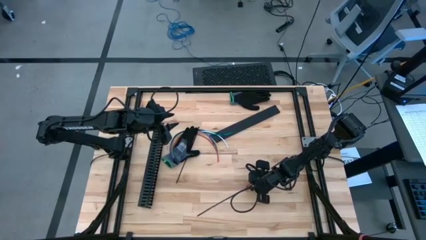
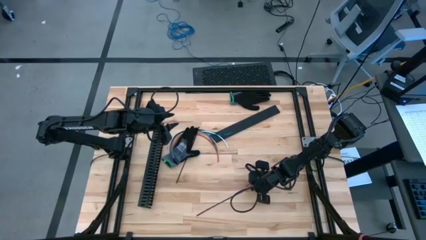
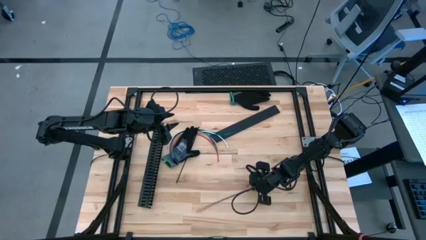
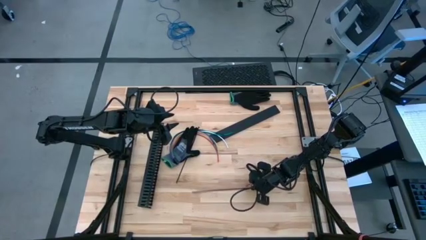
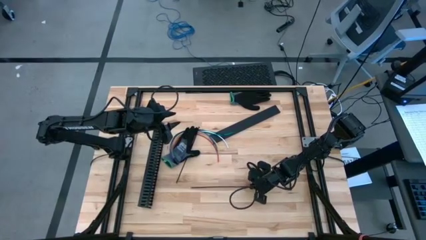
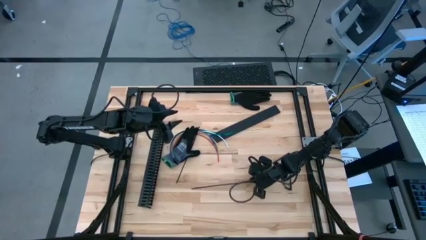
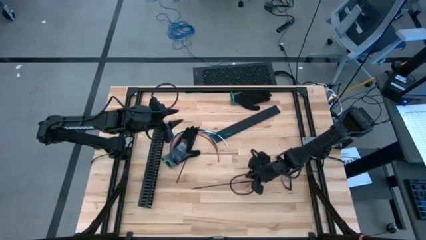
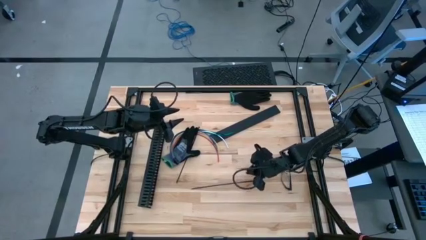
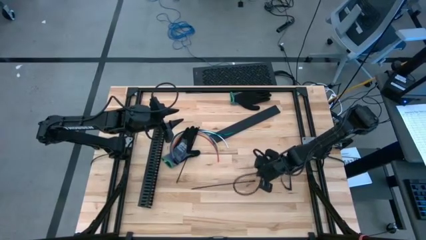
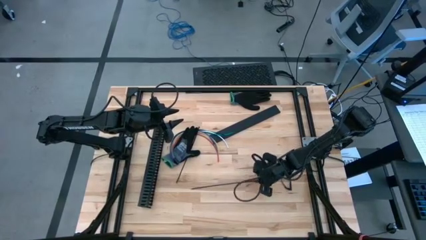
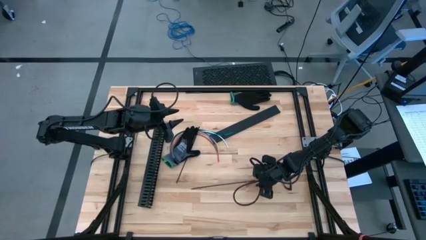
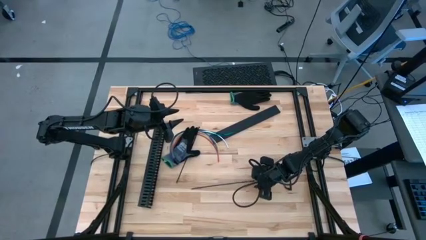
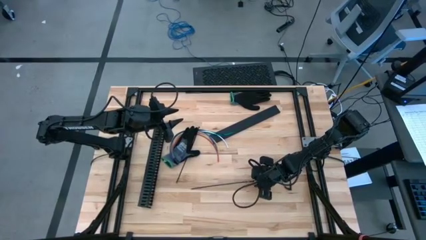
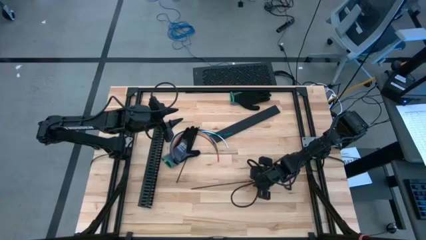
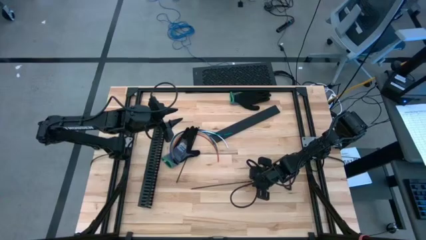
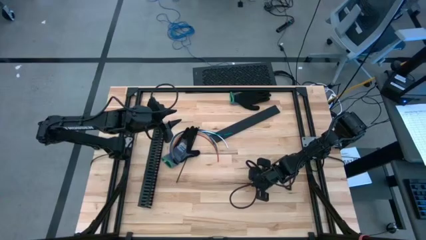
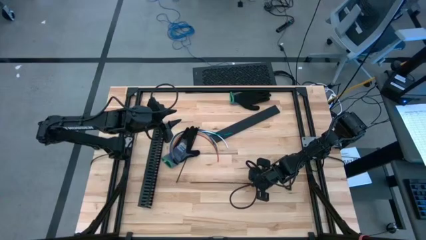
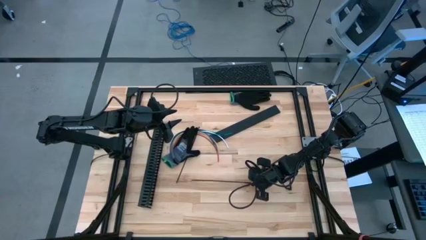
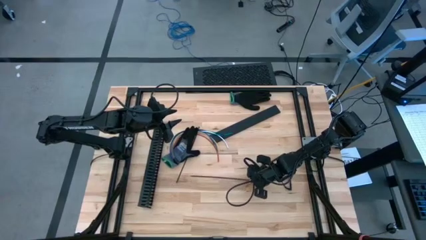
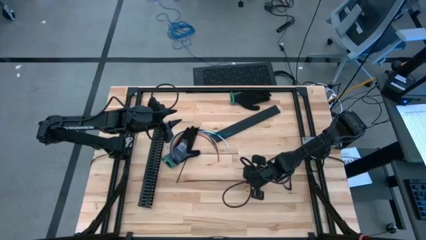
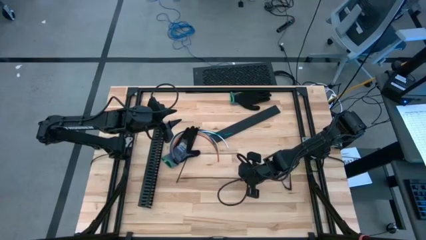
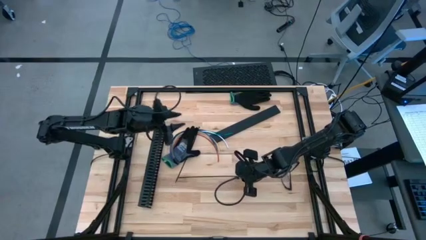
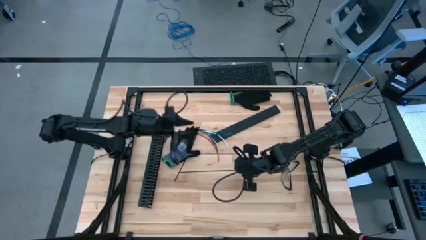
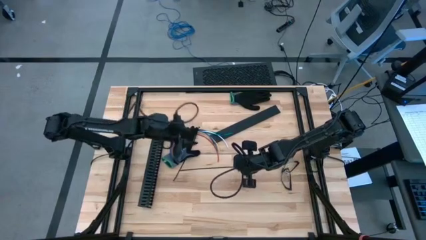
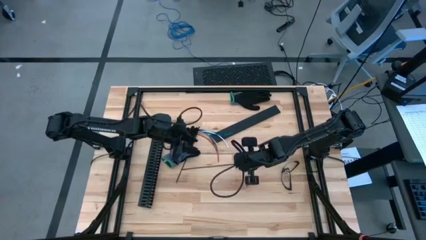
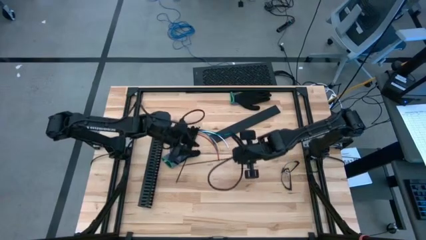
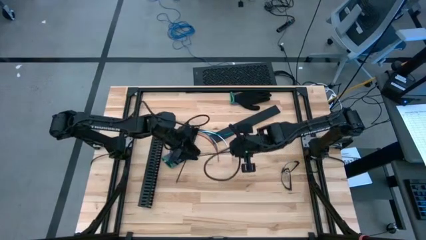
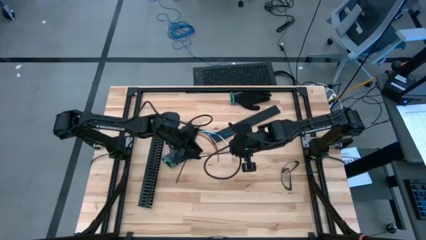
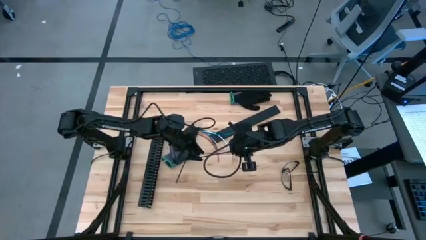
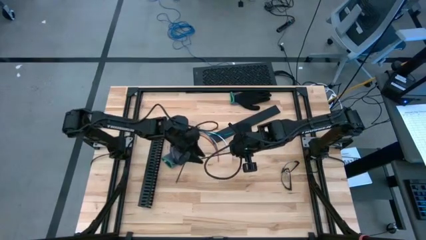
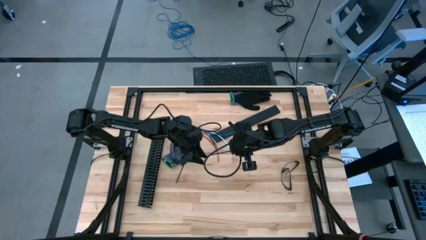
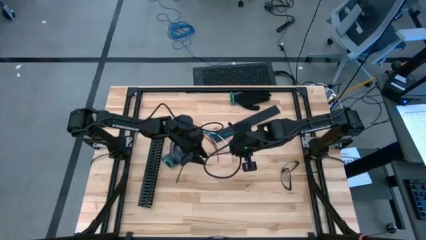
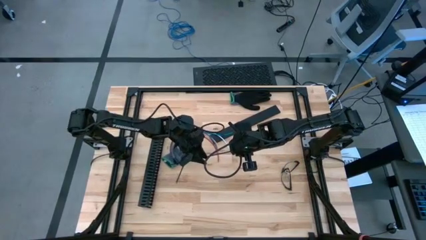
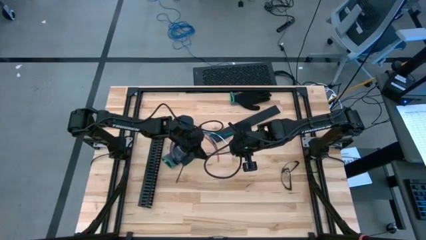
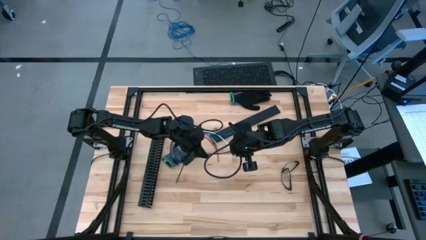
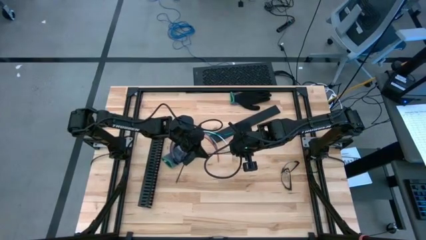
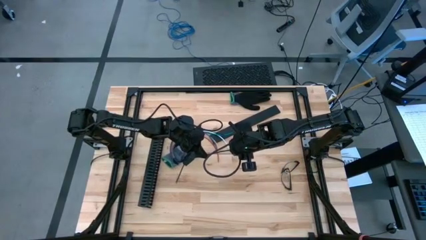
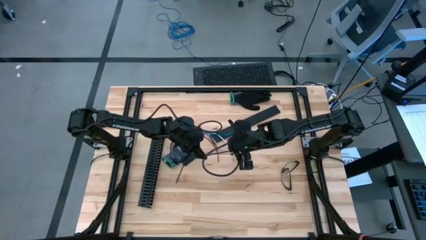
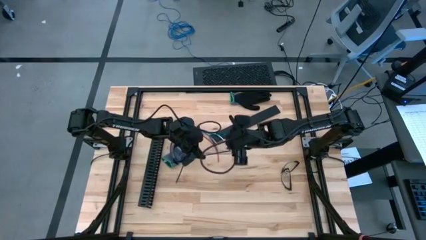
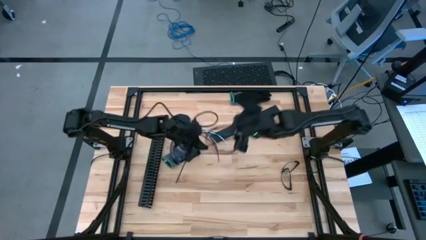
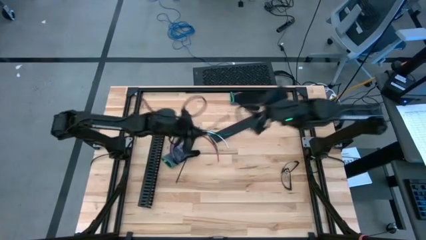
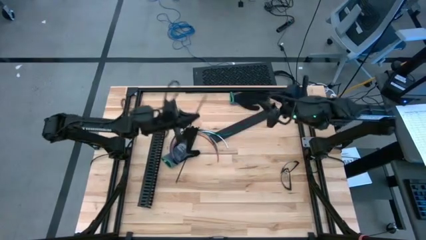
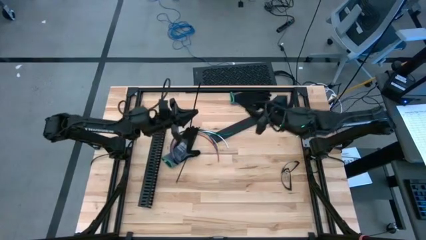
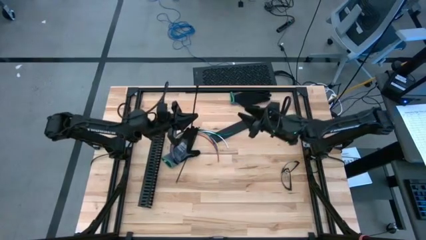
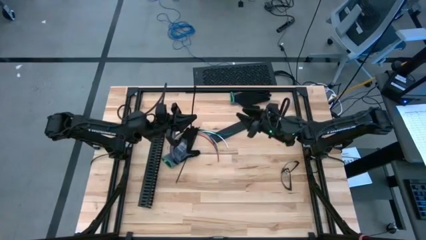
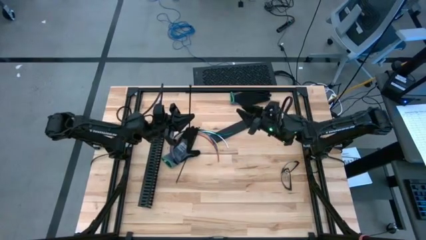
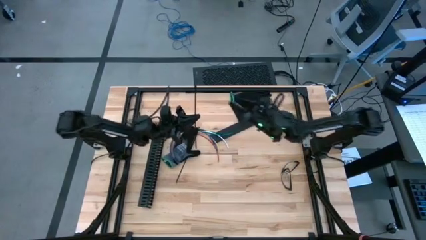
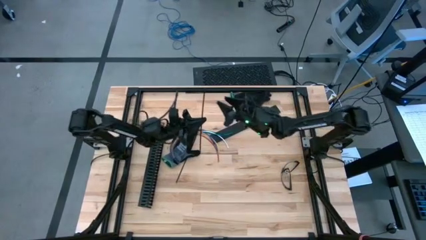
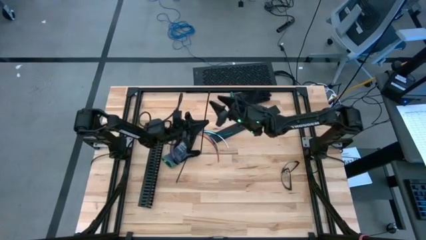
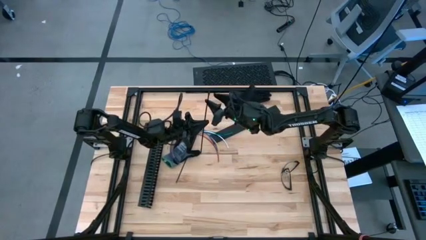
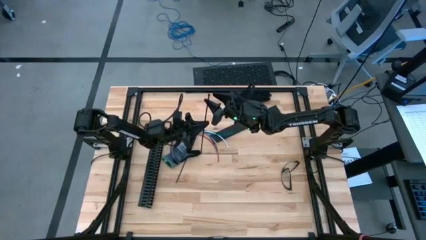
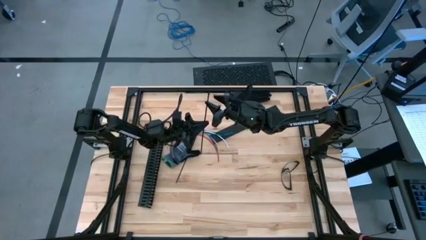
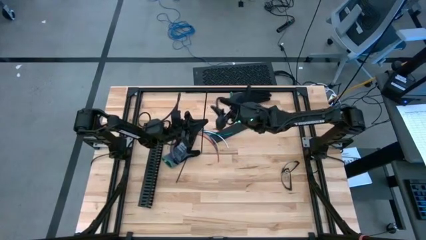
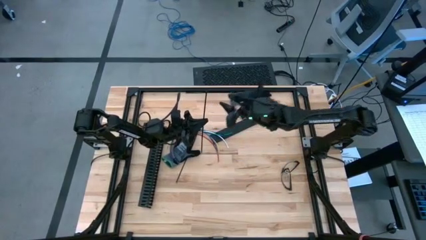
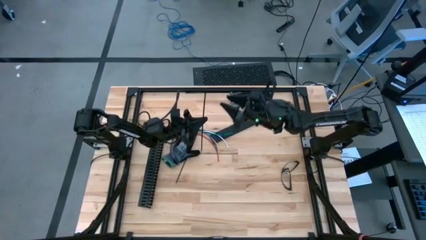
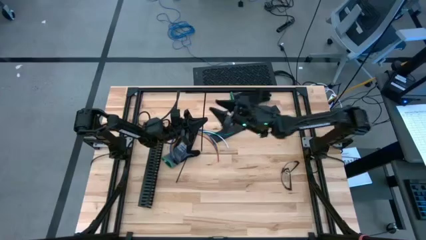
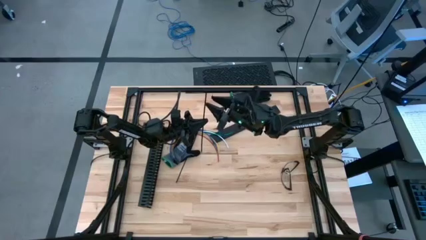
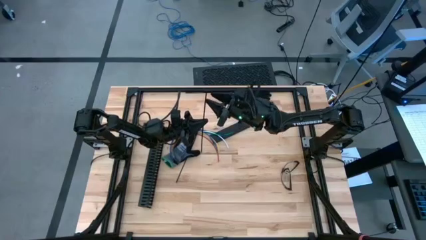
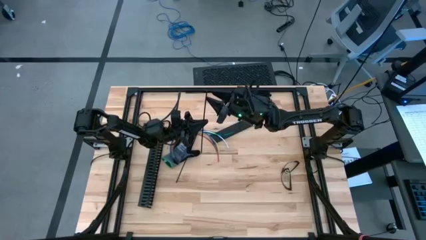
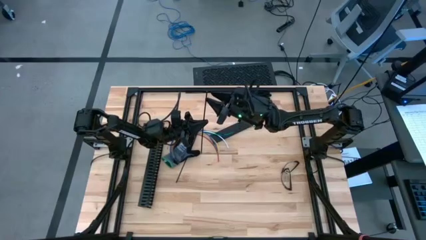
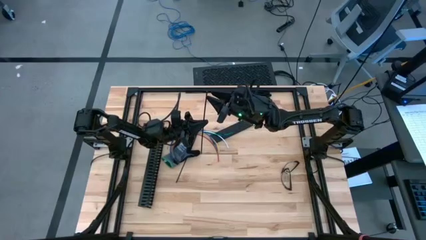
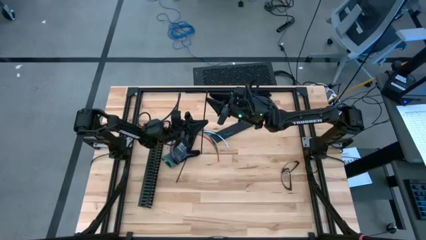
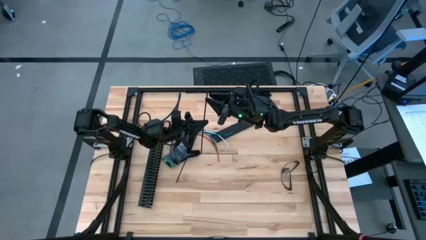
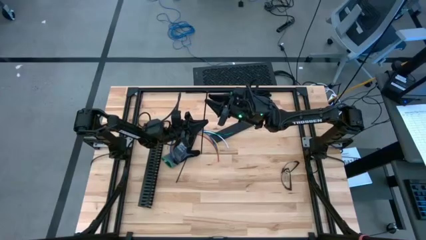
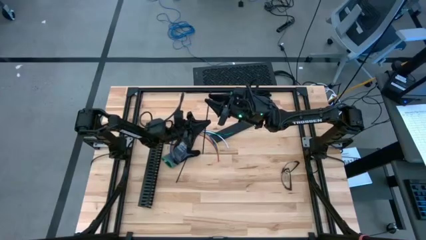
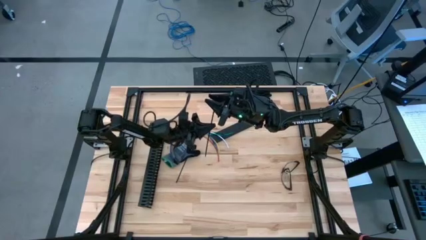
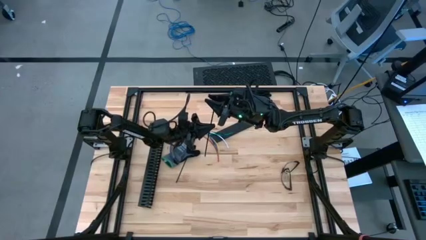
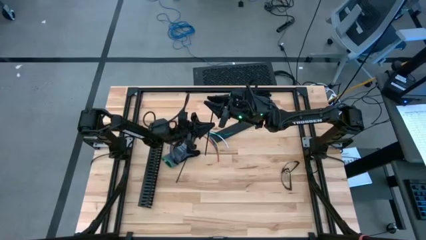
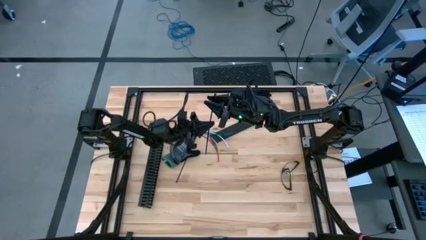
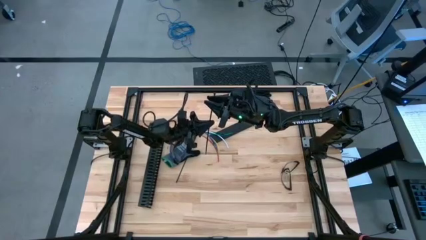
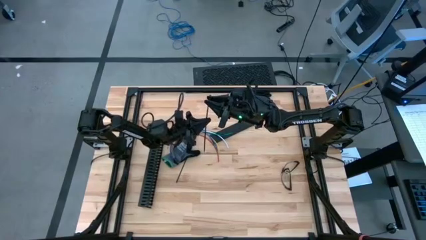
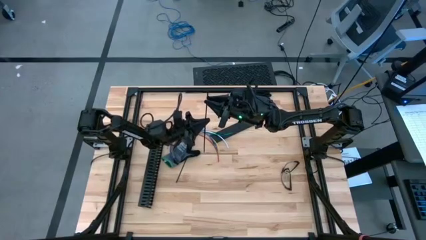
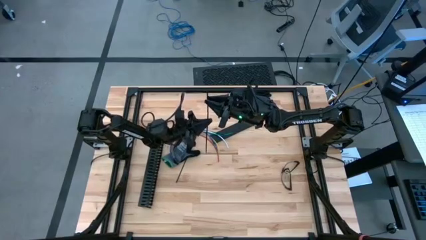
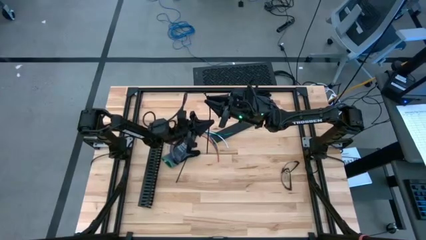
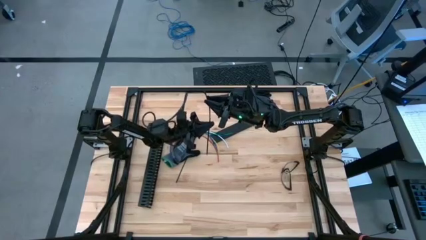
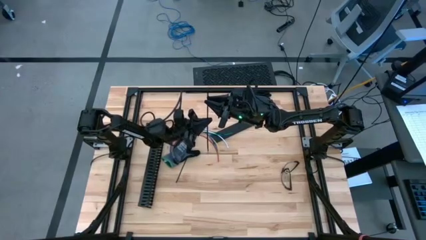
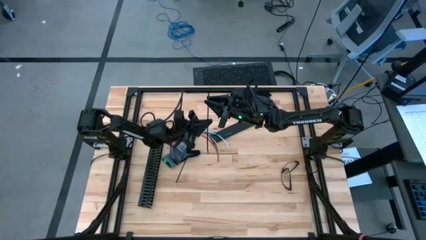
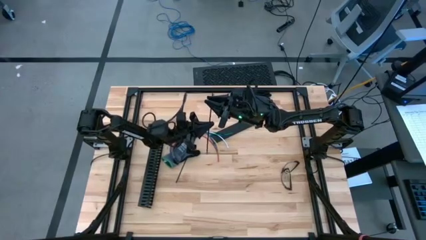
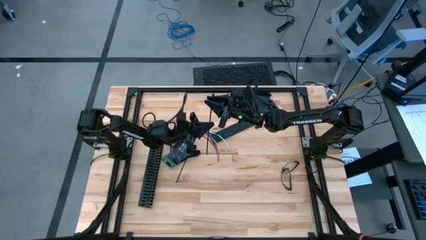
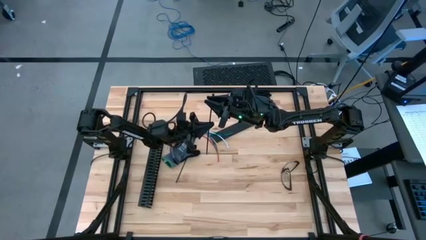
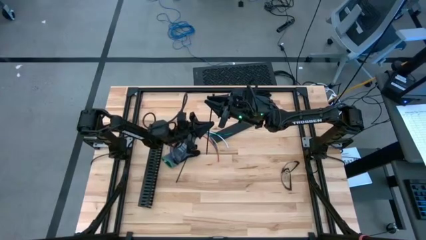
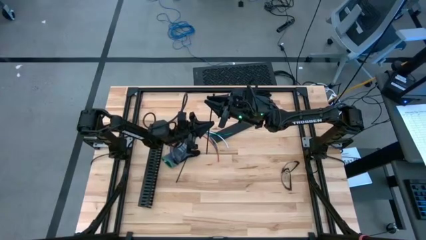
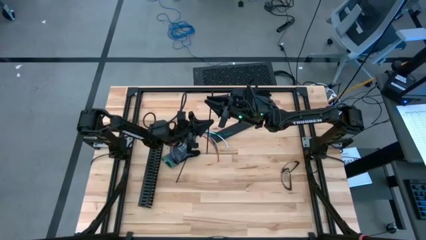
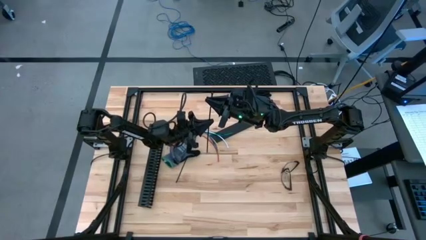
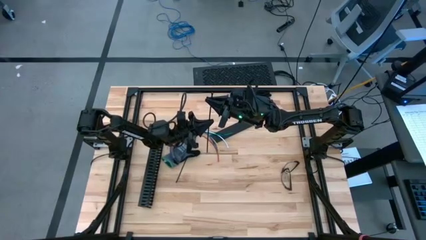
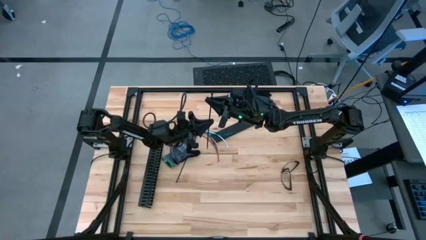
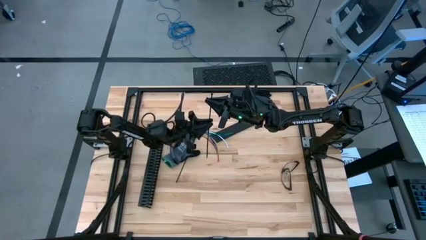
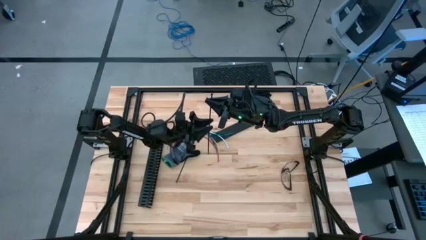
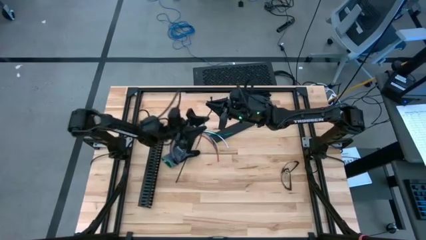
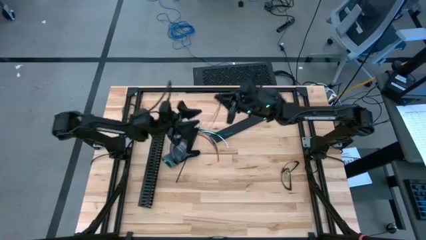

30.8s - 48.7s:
Task: Ziptie cables
Wrap the cable wires with the black zip tie
